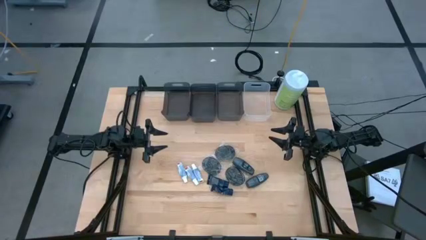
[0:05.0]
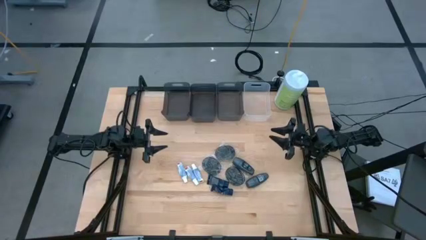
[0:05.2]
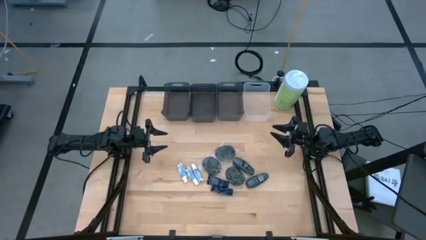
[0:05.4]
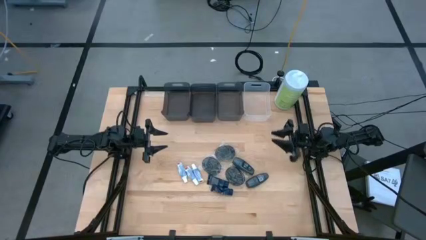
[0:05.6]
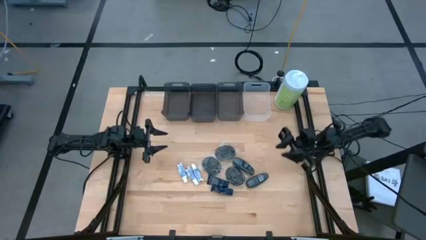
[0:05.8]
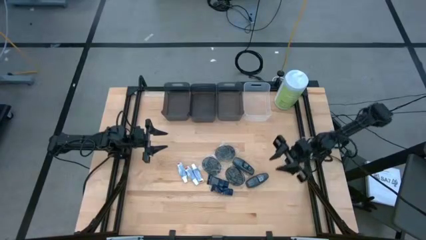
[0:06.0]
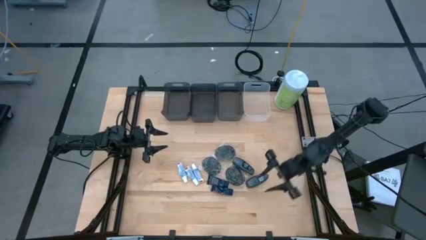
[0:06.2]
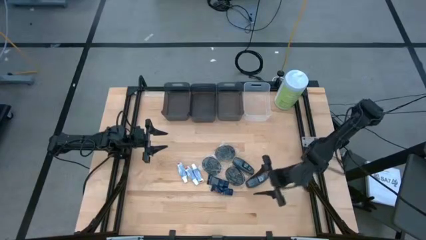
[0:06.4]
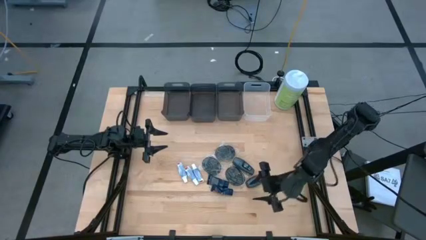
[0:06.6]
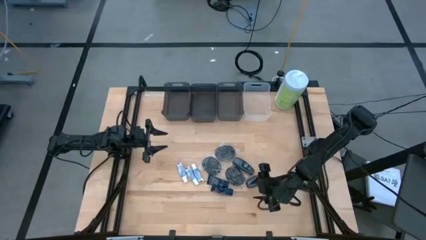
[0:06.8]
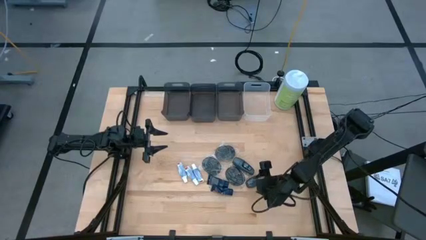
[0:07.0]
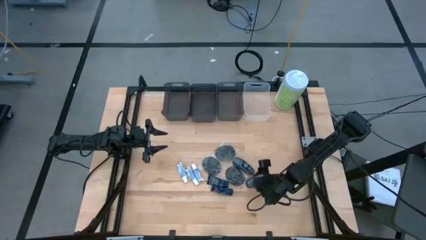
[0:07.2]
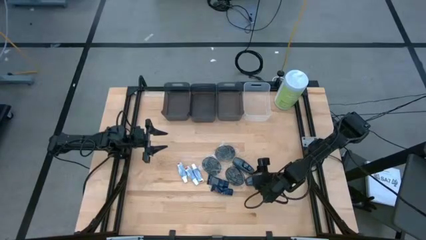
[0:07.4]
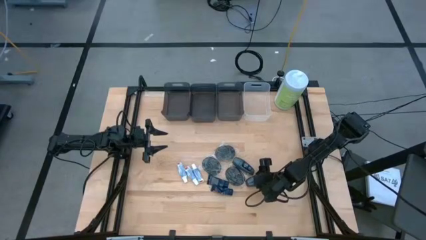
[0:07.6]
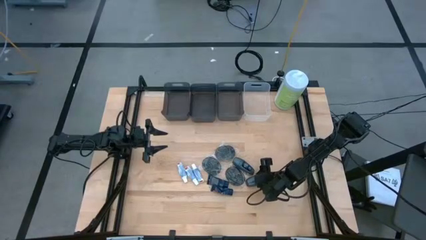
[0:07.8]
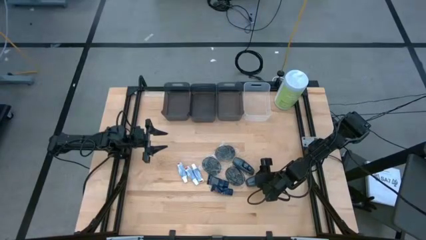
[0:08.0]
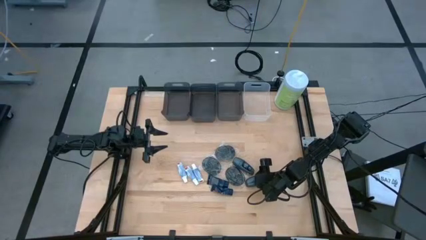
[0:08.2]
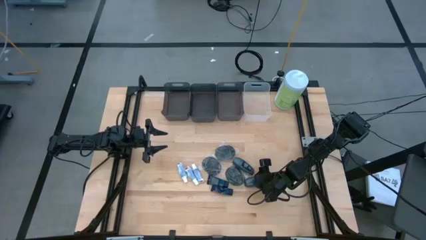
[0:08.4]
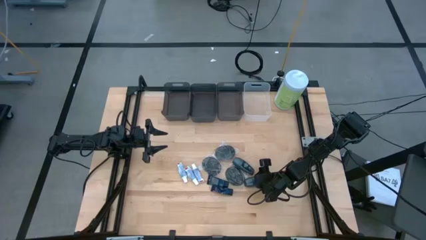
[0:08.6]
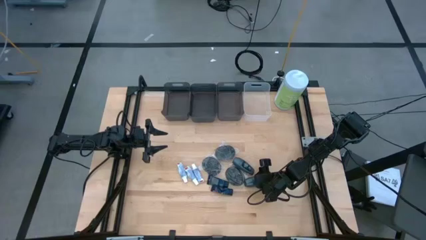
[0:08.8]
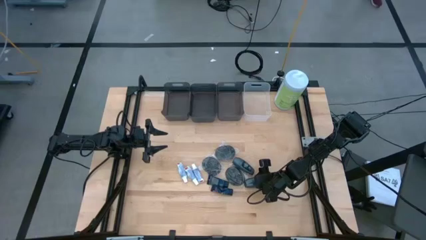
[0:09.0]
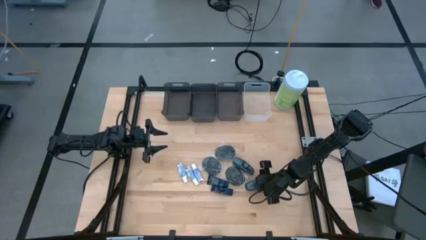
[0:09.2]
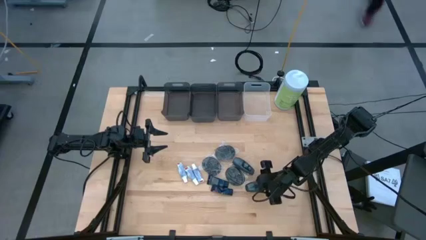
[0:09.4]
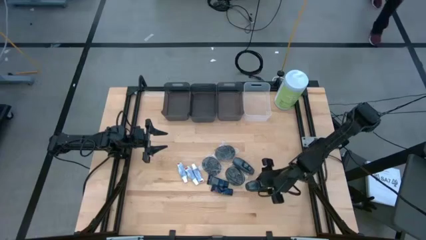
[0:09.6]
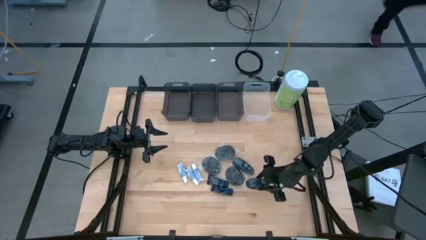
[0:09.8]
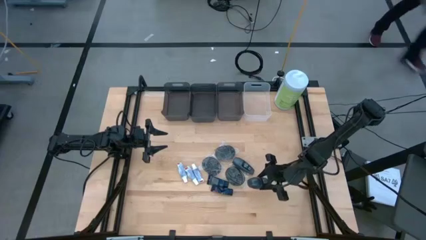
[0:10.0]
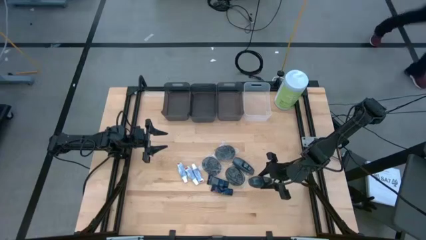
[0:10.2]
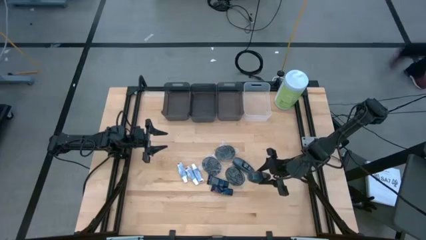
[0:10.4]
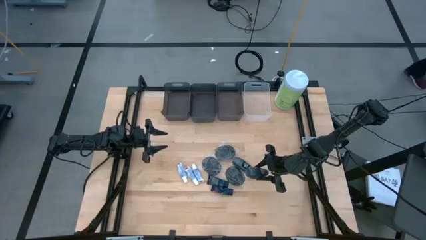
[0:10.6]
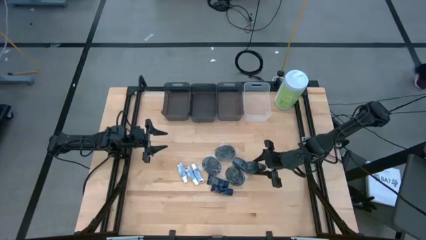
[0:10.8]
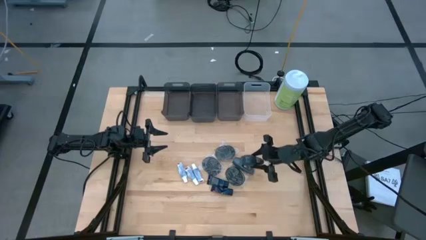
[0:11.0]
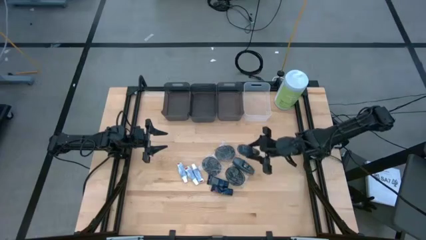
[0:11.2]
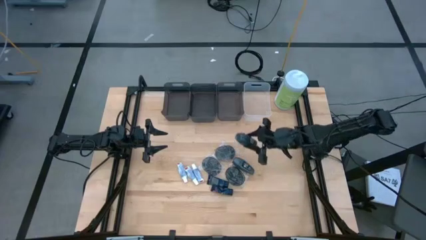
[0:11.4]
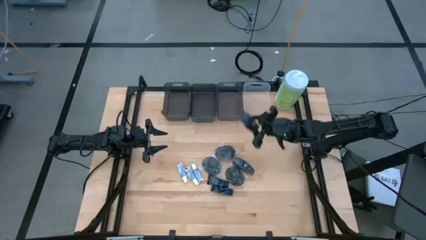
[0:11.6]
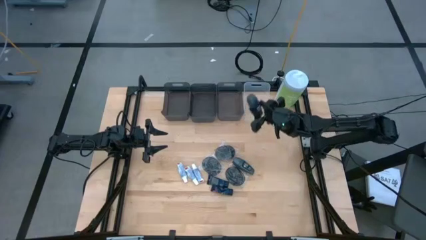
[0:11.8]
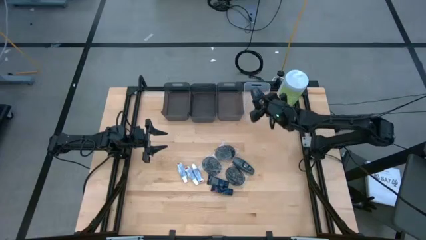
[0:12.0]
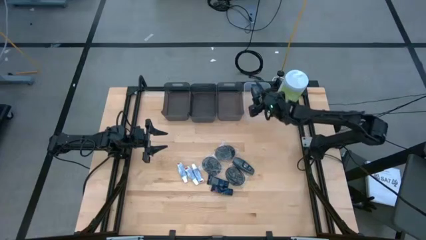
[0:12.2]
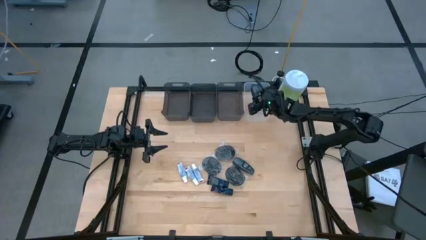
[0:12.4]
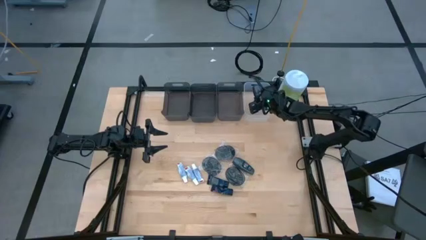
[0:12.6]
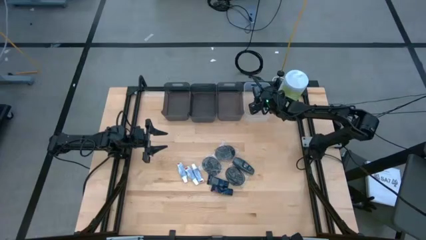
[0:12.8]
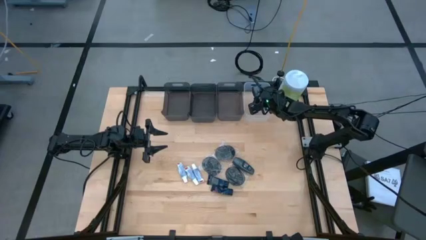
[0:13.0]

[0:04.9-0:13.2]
Task: Pick & Place Travel size toiletries
Put the bottom deodorant into the transparent bin

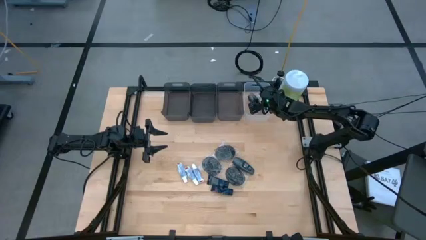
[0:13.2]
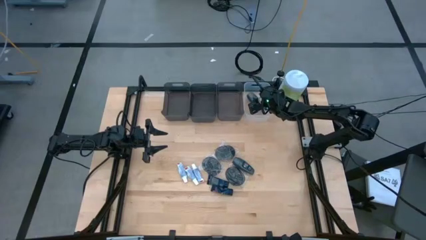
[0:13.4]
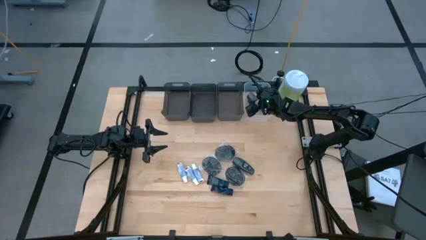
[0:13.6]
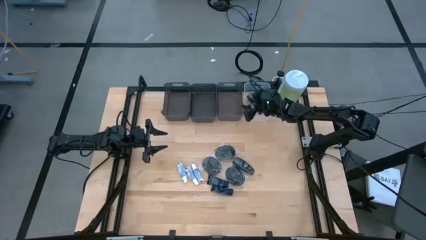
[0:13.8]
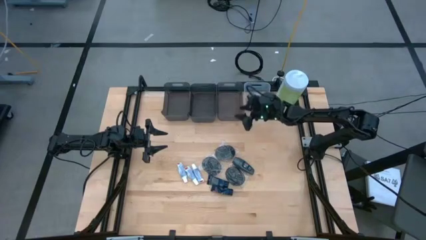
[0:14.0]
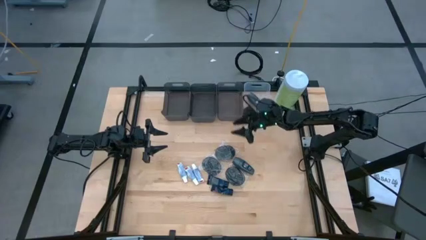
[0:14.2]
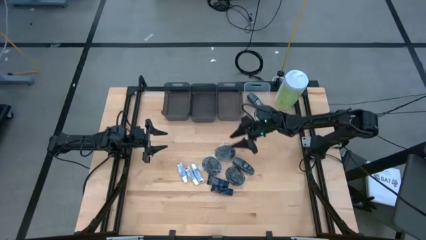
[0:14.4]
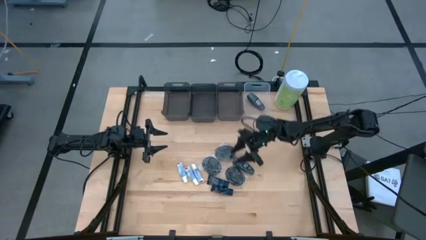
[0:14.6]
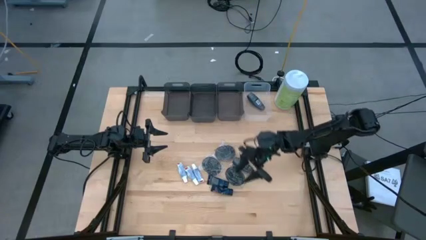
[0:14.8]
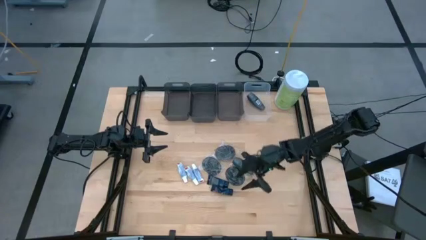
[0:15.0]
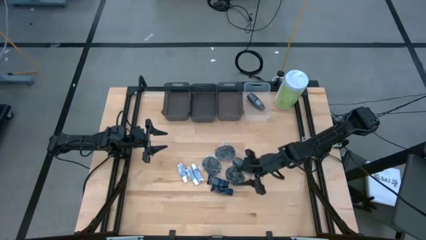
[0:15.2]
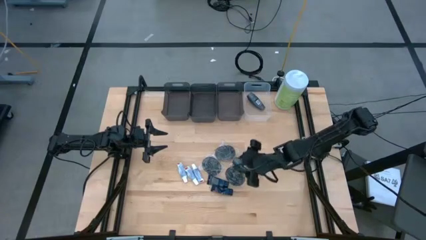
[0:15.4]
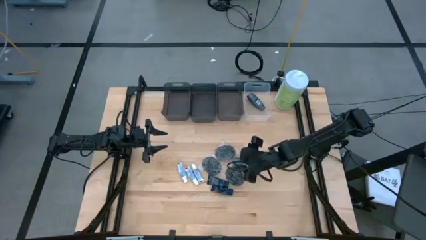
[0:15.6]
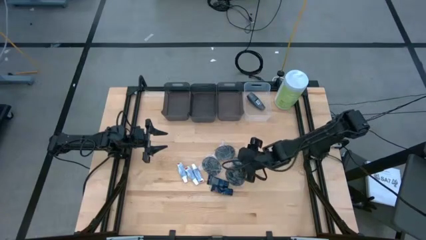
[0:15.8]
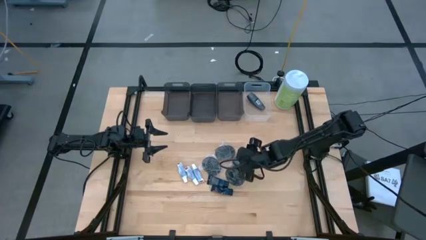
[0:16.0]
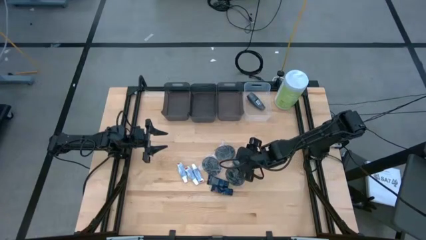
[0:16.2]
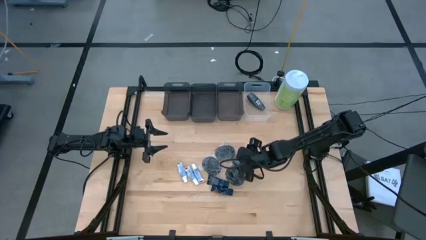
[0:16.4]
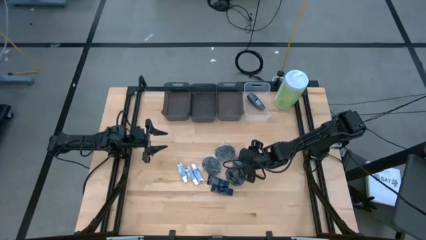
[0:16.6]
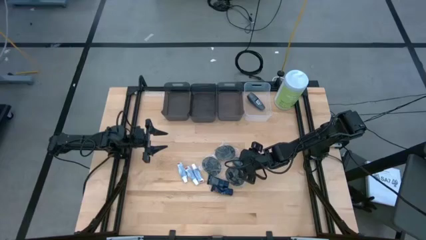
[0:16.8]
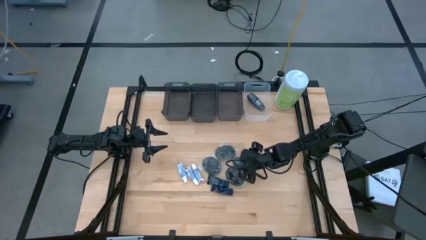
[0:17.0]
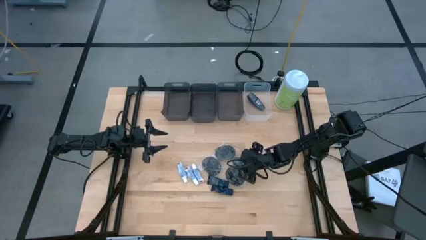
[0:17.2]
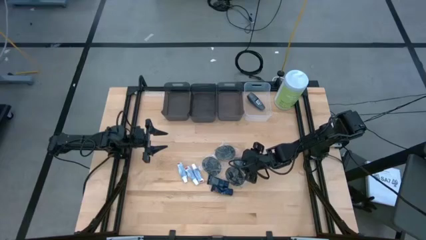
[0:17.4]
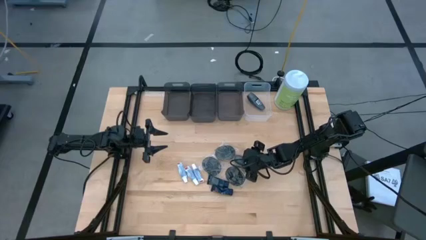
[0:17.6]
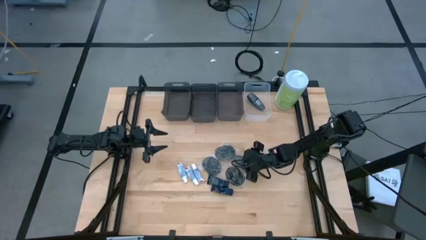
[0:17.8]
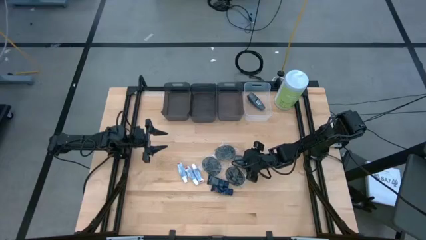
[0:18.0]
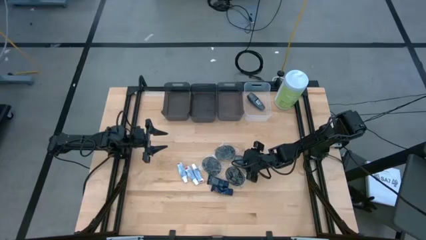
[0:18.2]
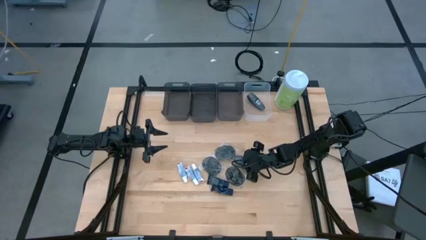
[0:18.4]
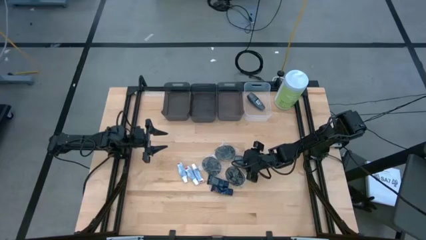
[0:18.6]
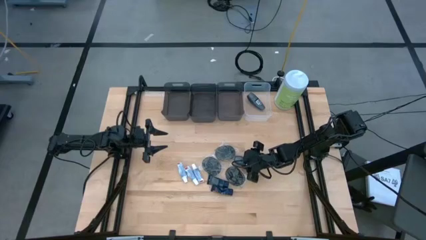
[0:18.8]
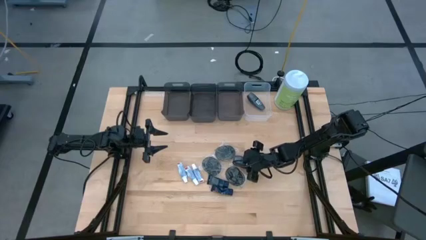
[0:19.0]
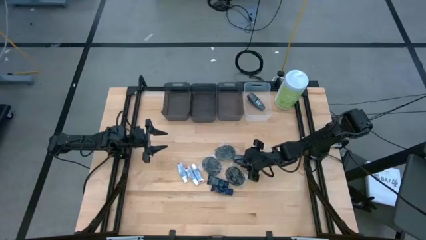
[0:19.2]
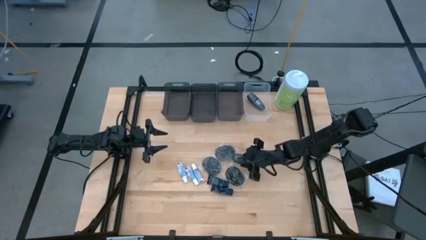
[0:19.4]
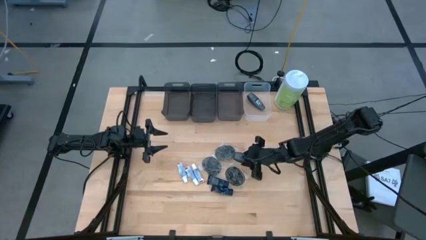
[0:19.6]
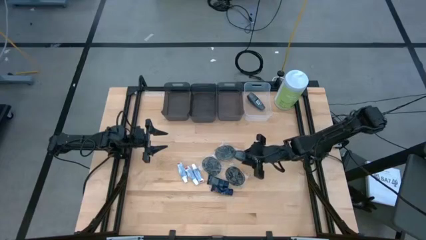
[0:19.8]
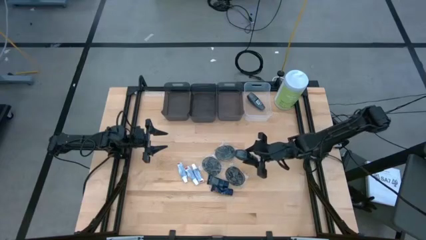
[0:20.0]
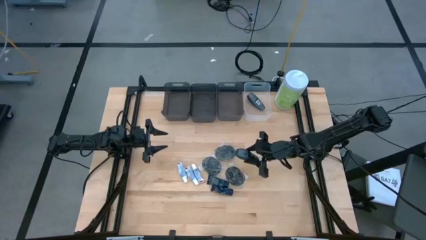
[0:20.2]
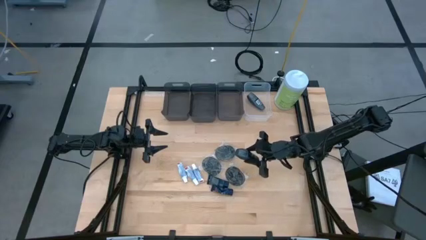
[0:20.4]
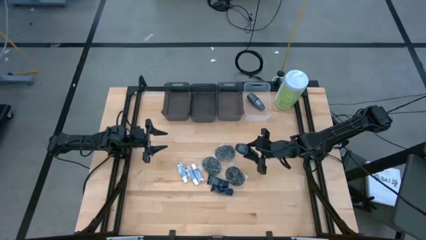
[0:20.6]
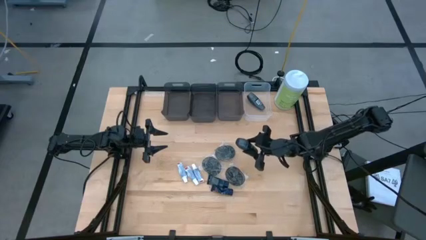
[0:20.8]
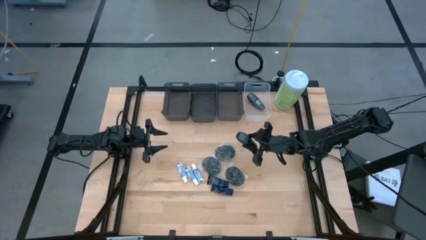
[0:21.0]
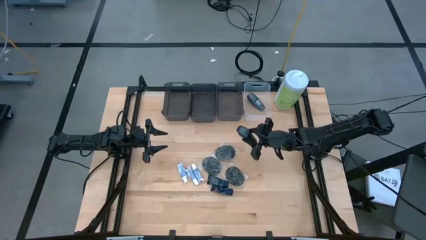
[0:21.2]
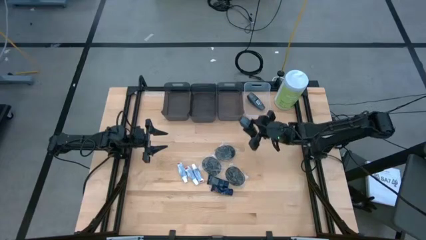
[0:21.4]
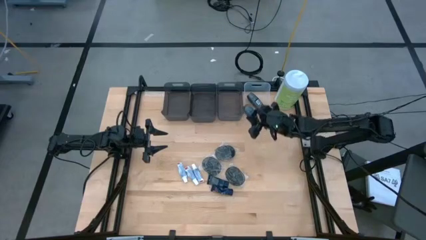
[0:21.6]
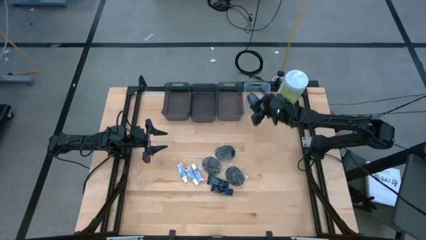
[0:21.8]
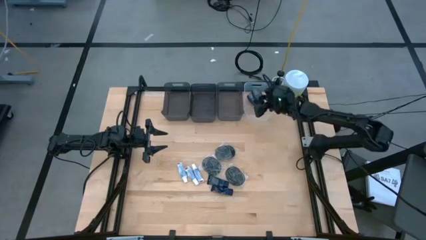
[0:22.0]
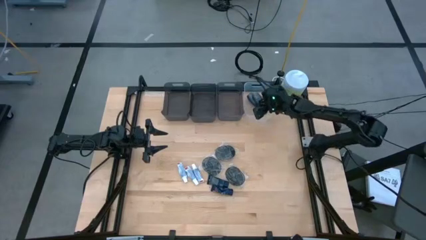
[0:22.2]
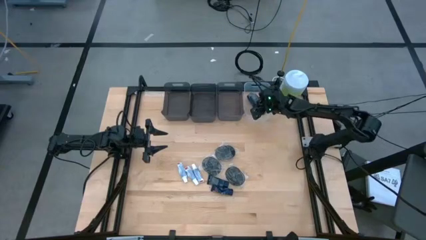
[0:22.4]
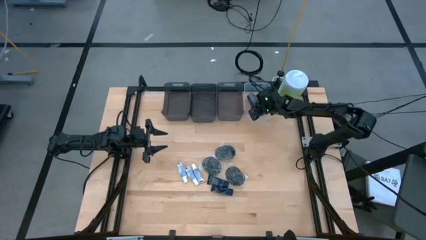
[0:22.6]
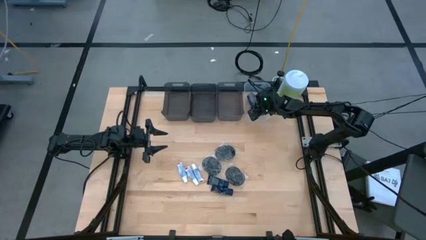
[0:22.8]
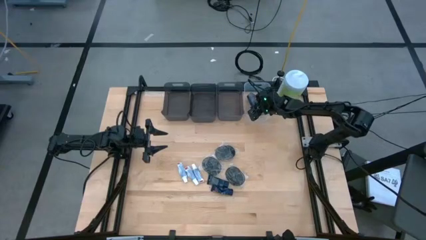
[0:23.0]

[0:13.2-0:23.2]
Put the deodorant into the transparent bin
